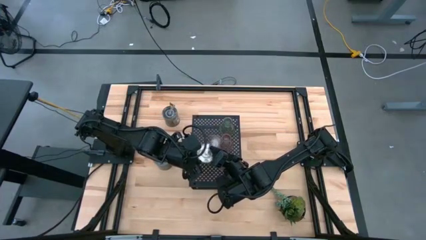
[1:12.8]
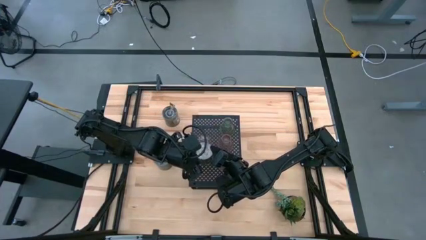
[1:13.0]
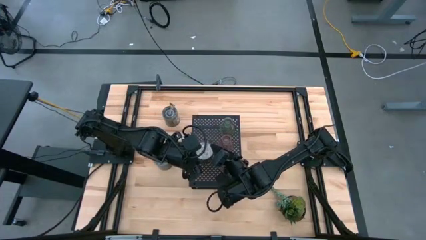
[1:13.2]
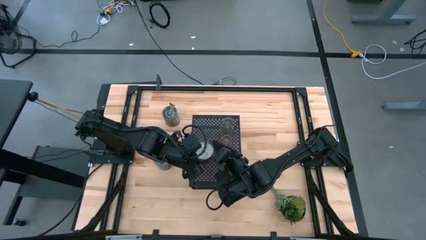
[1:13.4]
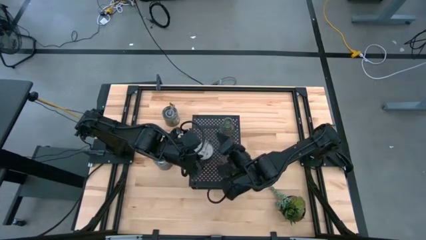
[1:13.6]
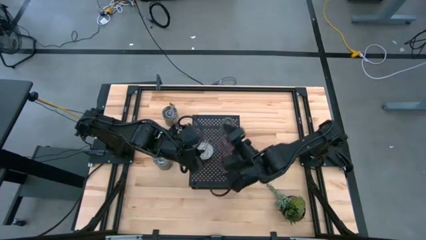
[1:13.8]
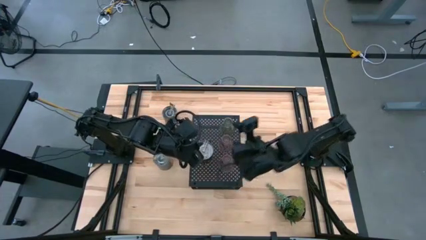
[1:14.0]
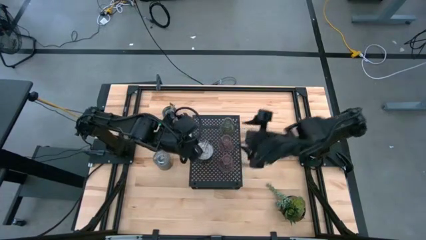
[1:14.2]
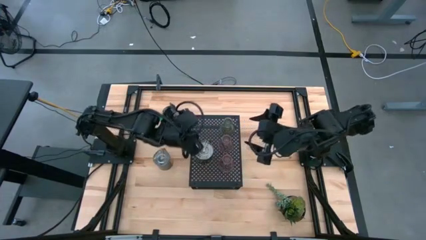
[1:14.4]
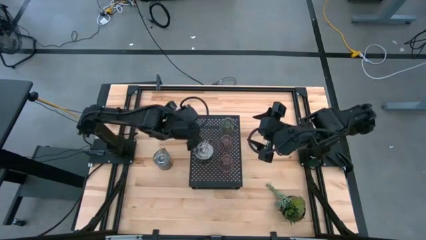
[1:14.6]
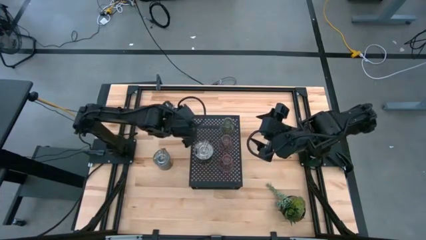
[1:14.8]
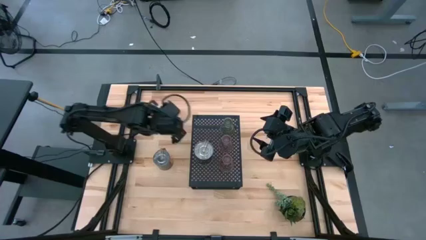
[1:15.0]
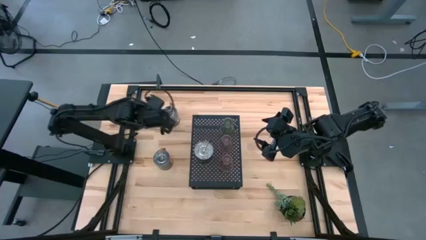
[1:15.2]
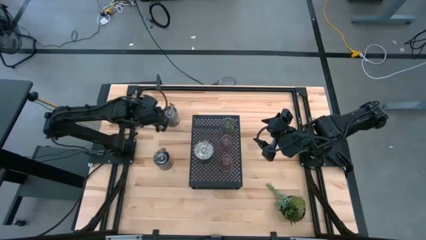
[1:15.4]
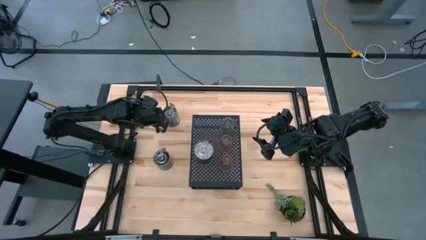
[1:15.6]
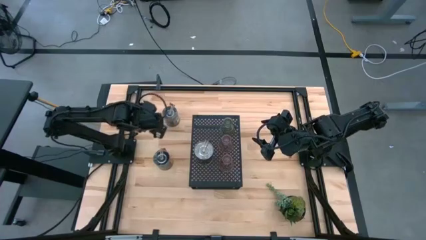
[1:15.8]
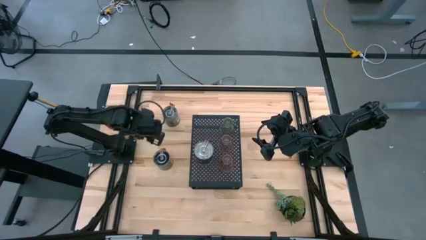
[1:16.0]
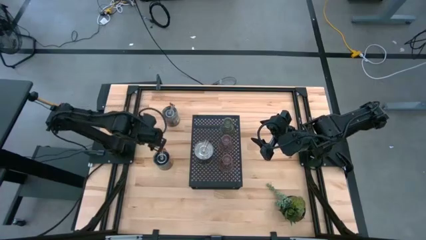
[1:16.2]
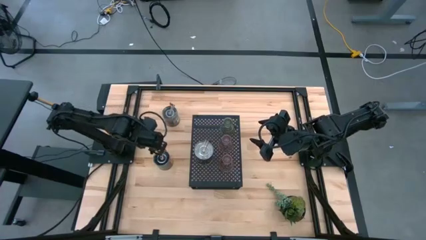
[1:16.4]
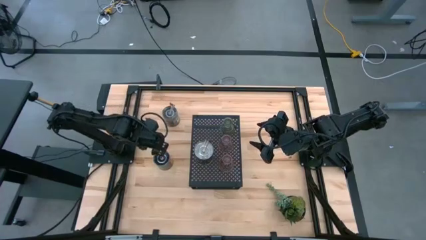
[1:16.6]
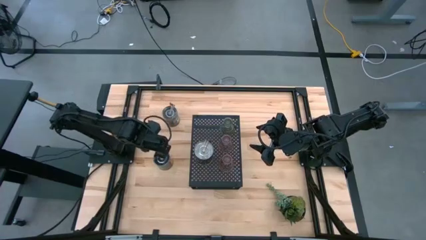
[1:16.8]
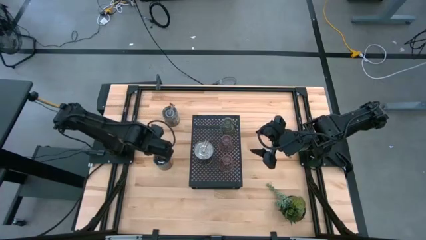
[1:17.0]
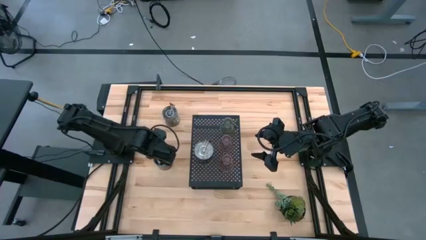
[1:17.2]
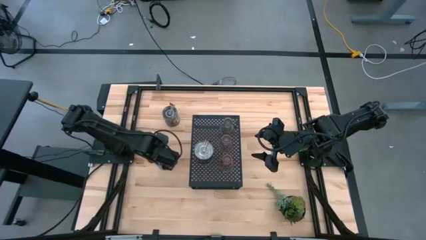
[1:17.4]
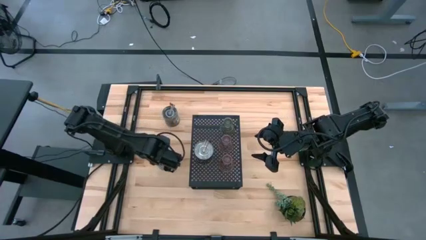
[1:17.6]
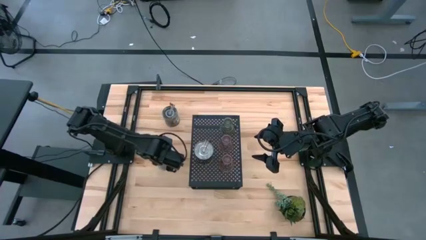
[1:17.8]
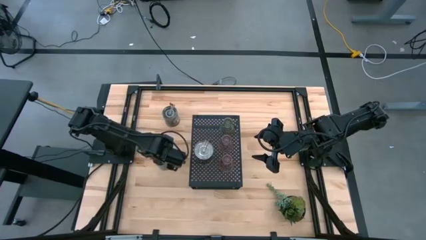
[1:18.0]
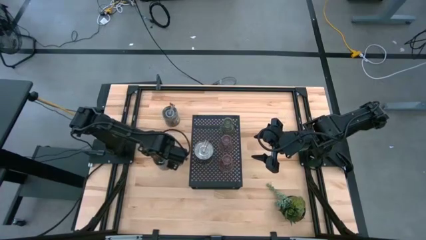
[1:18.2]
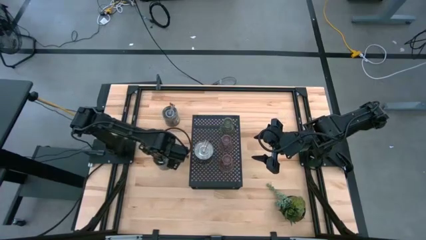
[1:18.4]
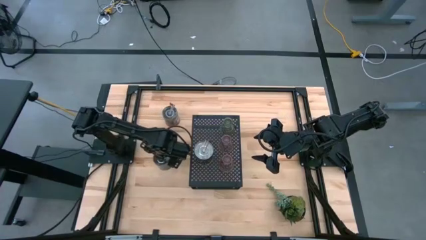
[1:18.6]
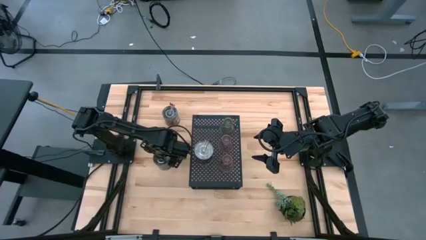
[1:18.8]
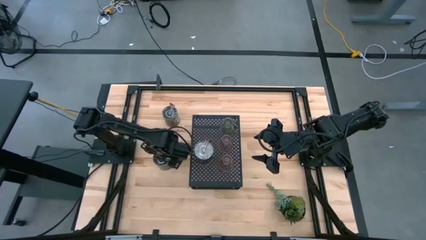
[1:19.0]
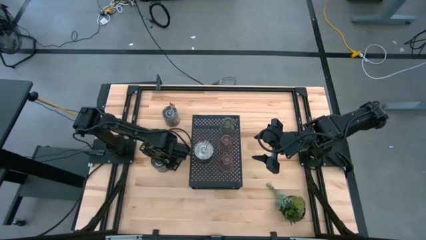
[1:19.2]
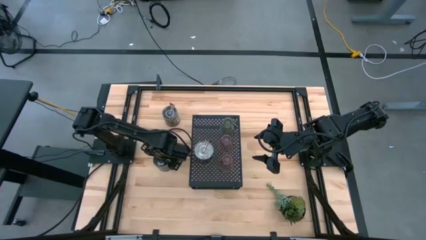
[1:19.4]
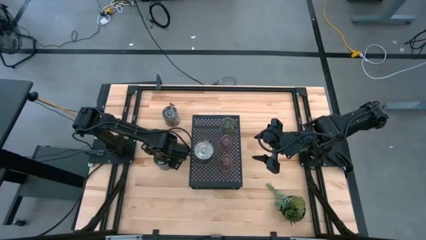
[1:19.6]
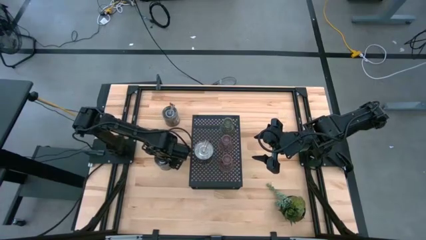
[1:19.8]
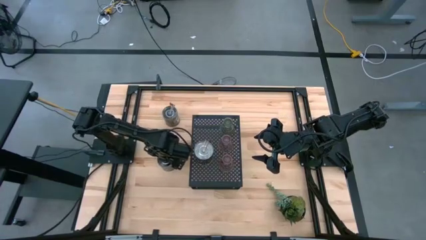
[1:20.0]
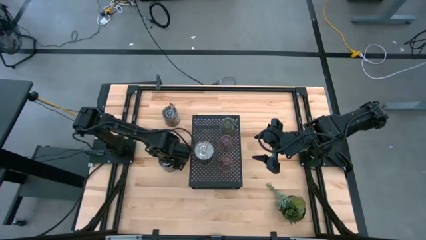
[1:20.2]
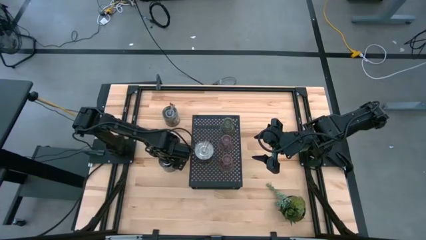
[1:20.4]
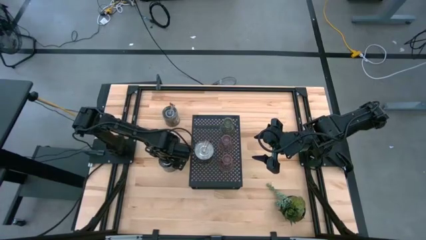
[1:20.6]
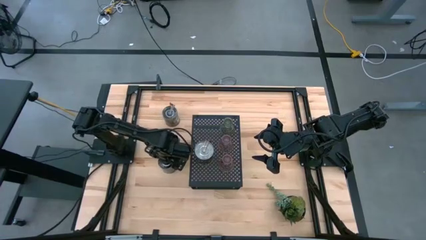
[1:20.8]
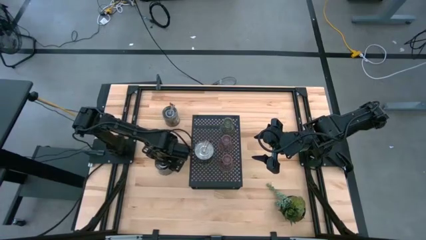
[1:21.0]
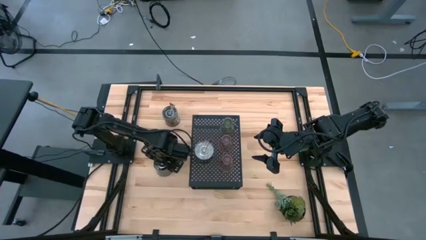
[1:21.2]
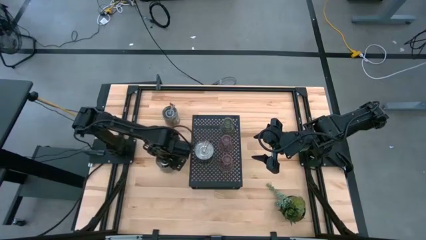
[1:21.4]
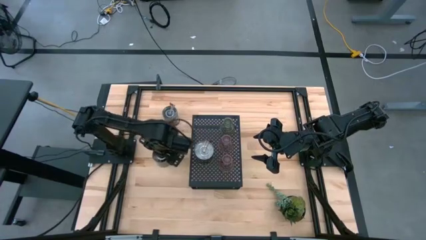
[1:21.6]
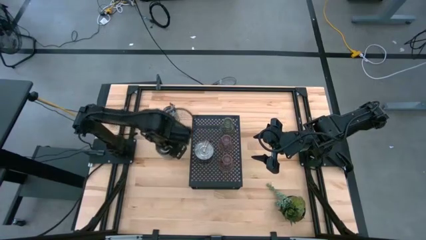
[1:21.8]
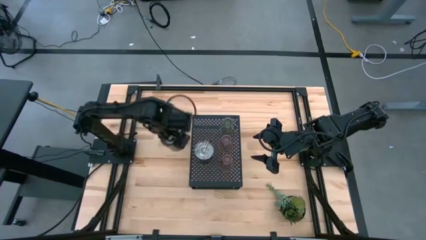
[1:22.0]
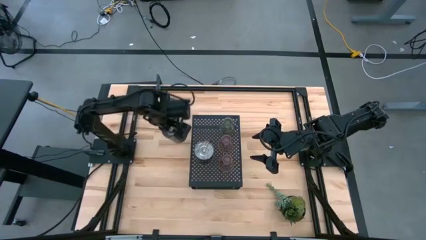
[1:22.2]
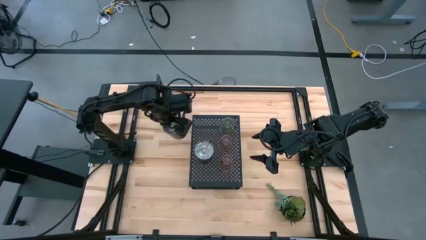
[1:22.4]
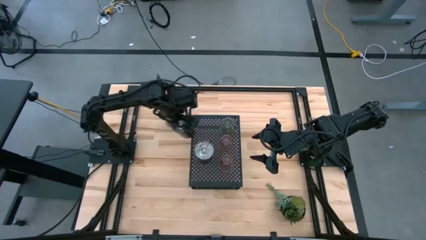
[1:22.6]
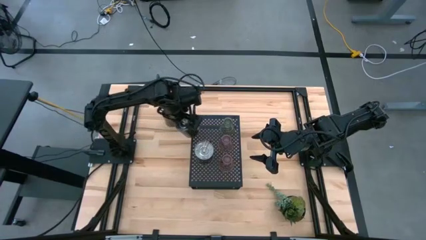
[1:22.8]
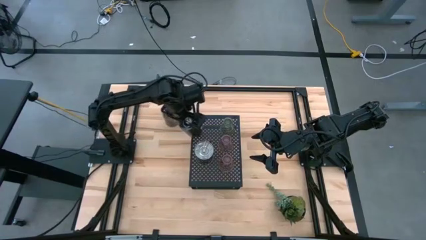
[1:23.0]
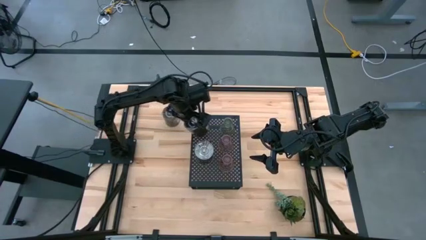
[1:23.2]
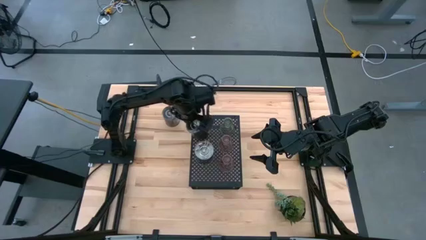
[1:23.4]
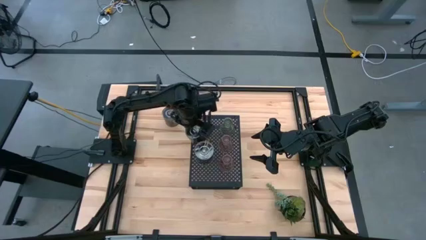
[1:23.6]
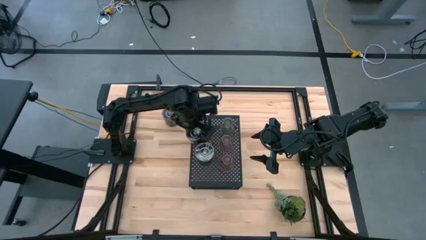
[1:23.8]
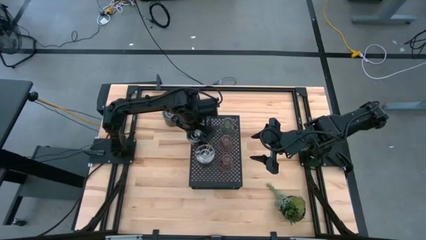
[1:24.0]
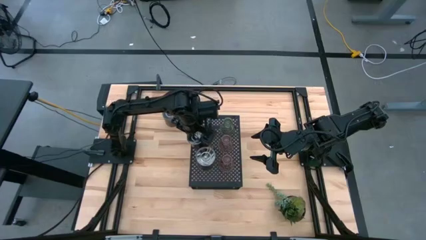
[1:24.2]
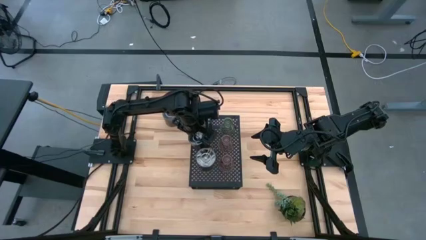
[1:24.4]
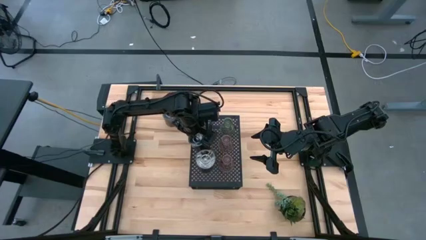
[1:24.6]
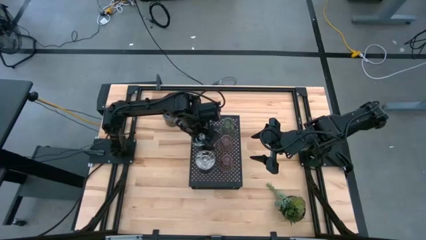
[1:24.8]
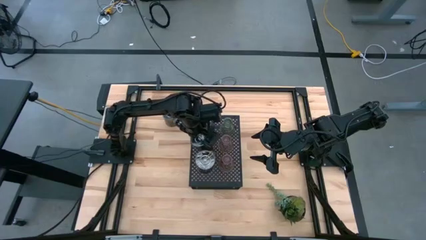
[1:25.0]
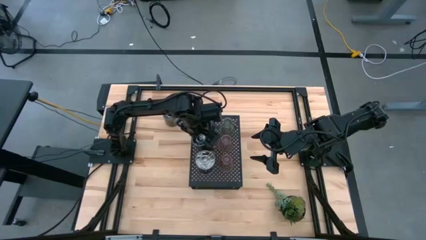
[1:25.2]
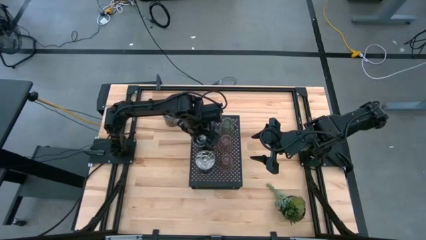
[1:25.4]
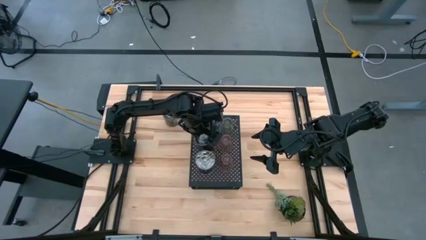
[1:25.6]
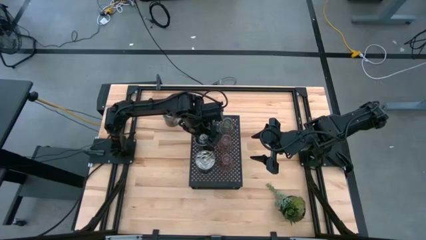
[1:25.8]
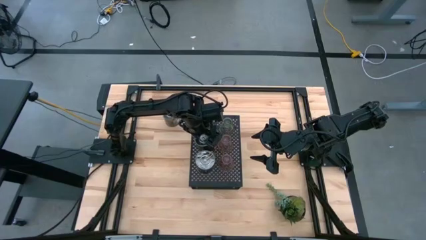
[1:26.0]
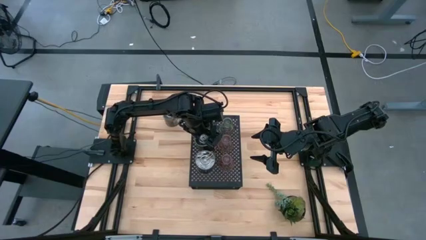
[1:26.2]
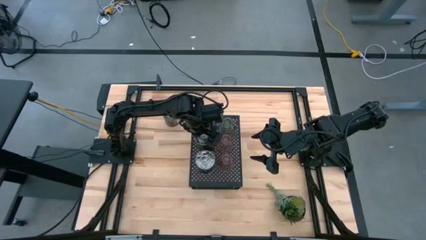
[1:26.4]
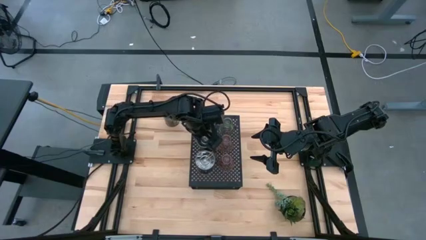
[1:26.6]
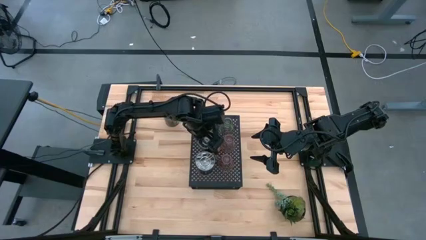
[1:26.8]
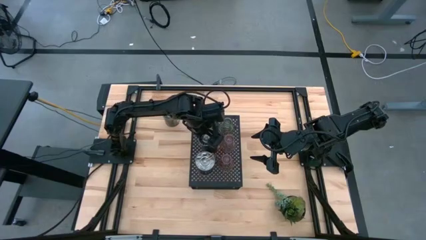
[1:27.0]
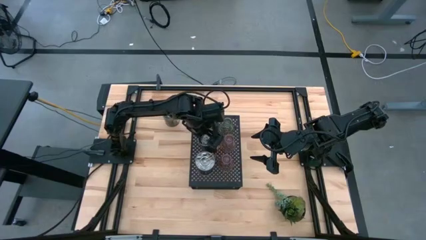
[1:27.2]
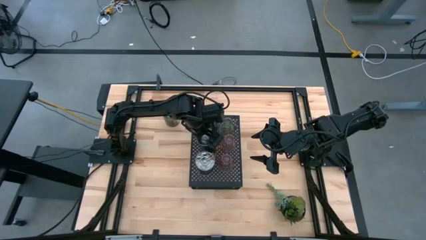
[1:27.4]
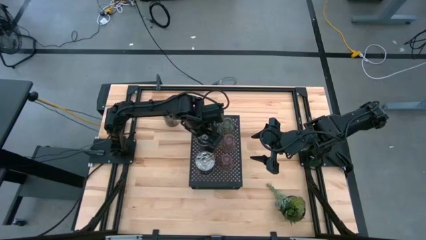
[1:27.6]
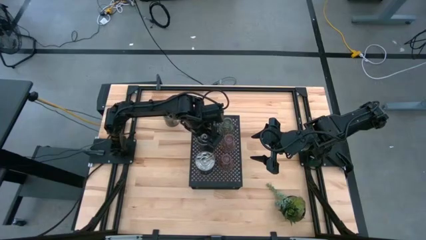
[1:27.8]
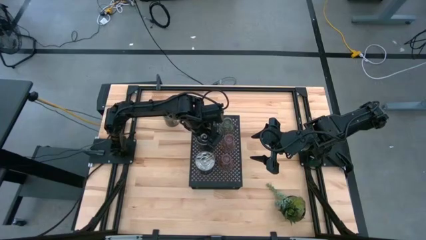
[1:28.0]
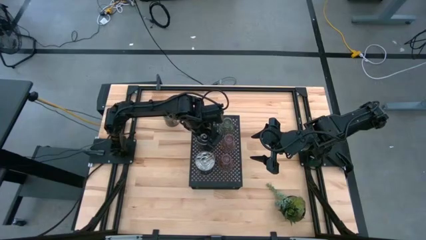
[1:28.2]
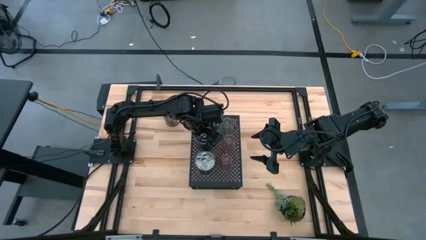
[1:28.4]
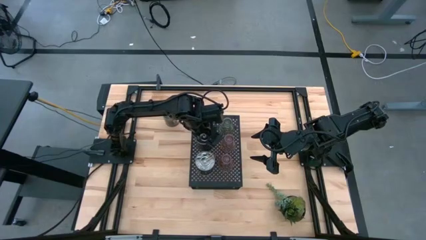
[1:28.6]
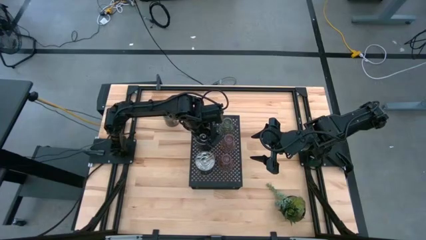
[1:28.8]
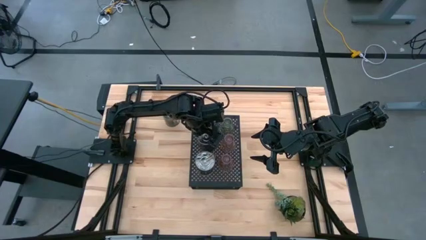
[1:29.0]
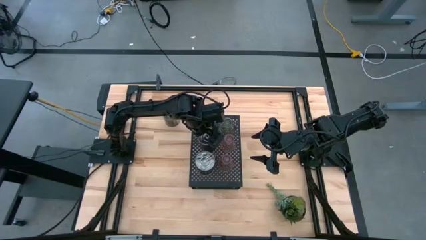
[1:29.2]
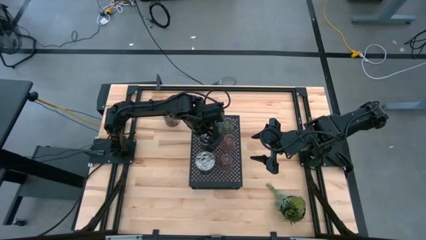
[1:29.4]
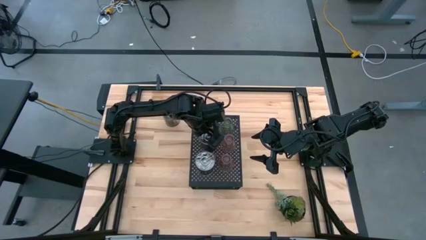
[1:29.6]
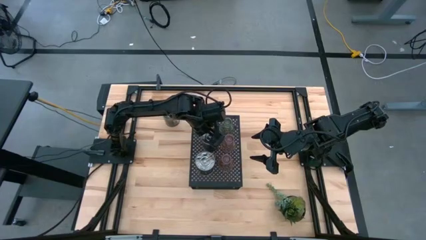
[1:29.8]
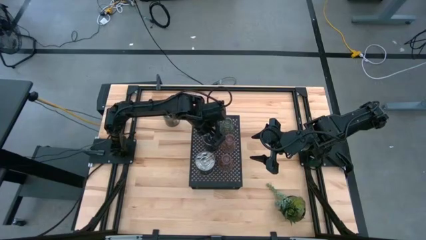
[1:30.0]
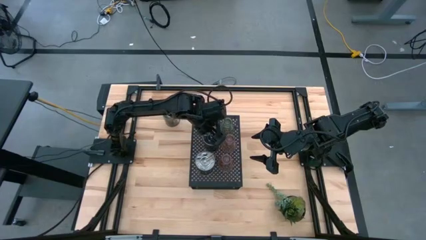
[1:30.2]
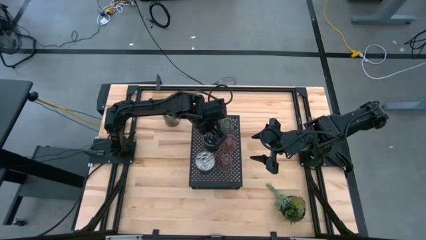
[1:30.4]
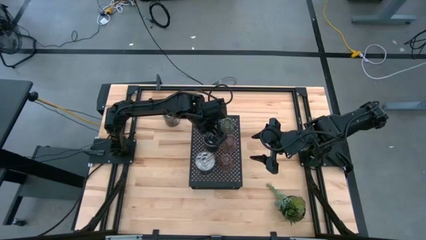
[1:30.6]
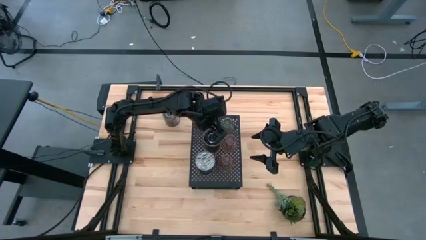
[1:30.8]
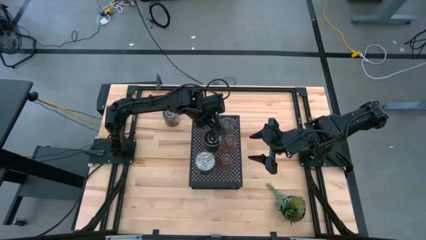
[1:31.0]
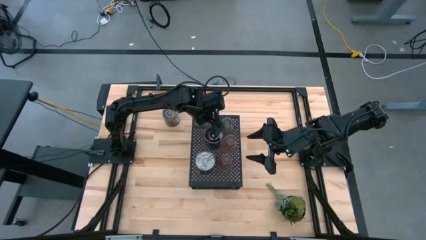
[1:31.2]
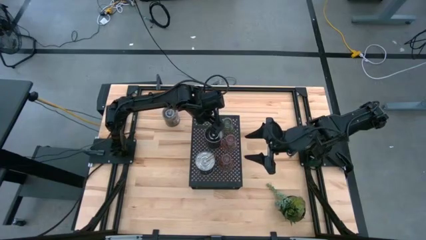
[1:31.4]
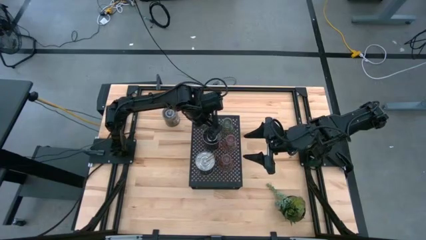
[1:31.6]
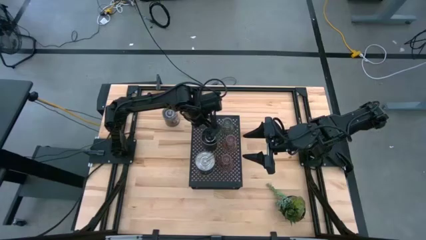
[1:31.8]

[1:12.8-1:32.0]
Task: Pick & Place candle stick holders
Put the bottom silver scented candle on the shelf aligned with the silver scented candle
